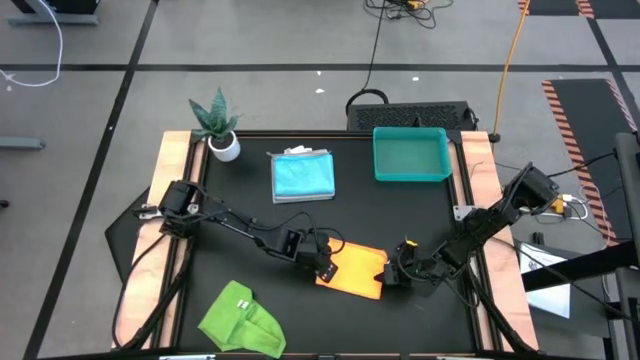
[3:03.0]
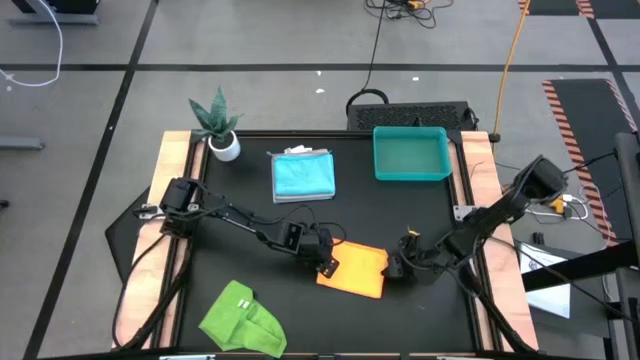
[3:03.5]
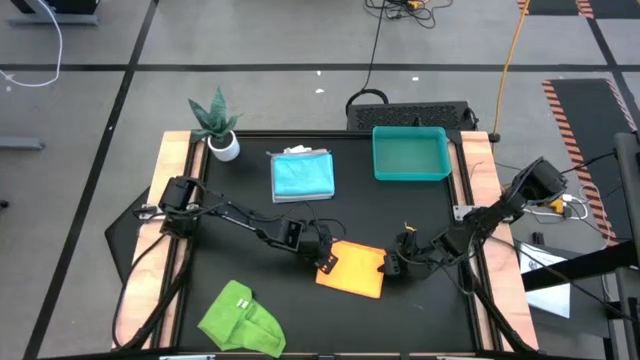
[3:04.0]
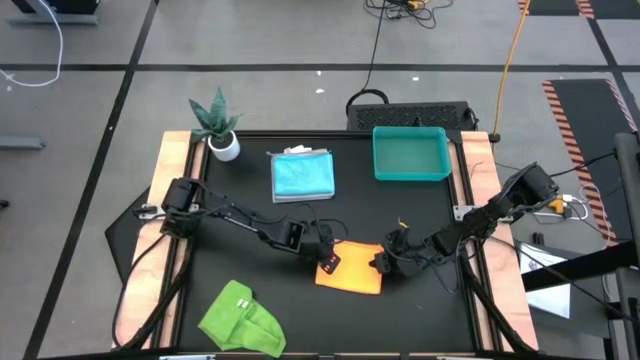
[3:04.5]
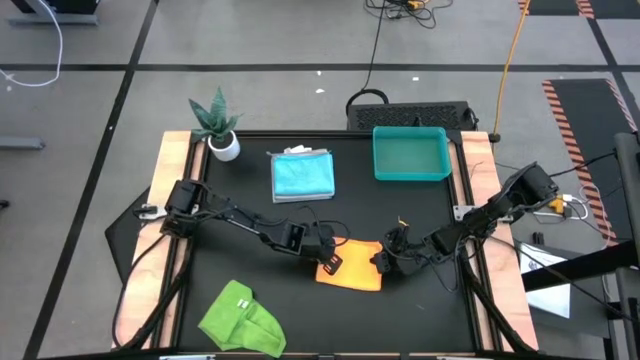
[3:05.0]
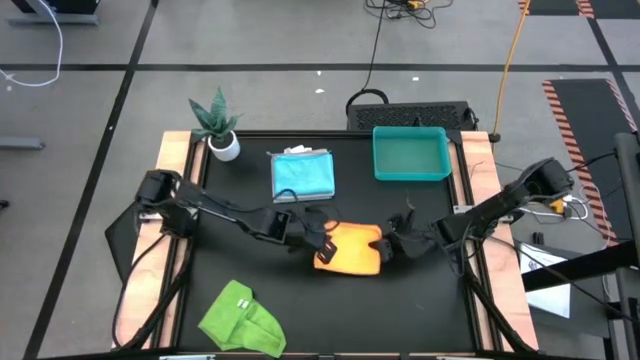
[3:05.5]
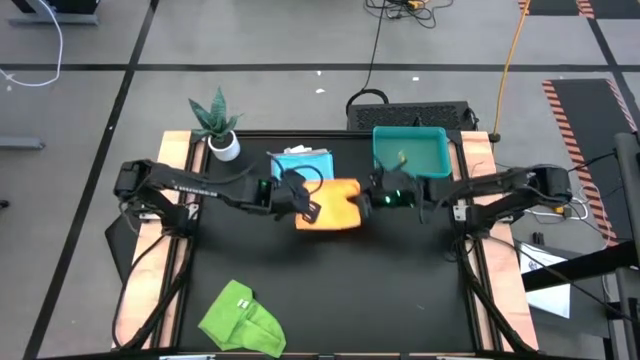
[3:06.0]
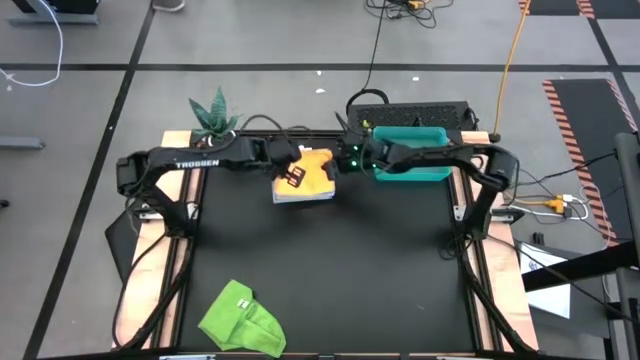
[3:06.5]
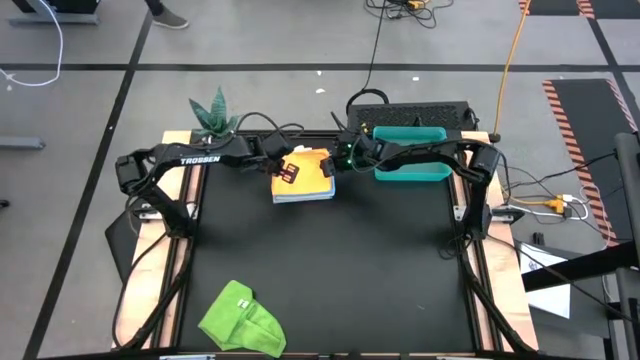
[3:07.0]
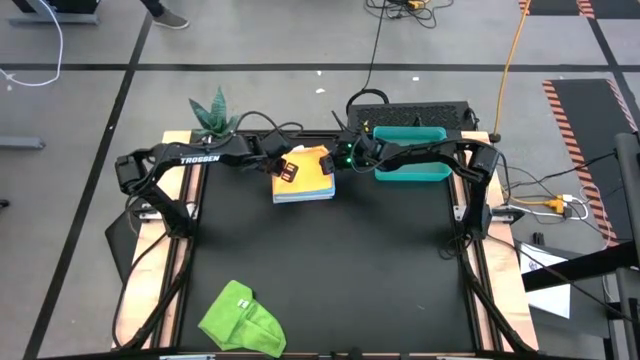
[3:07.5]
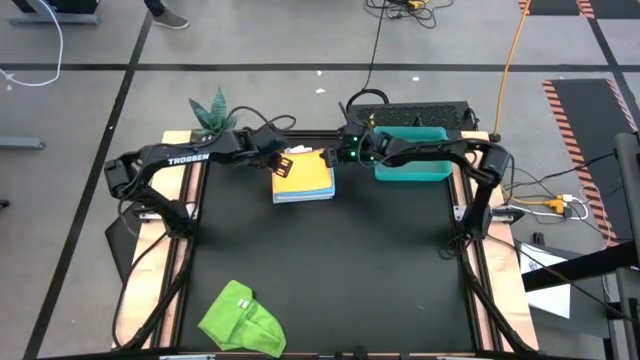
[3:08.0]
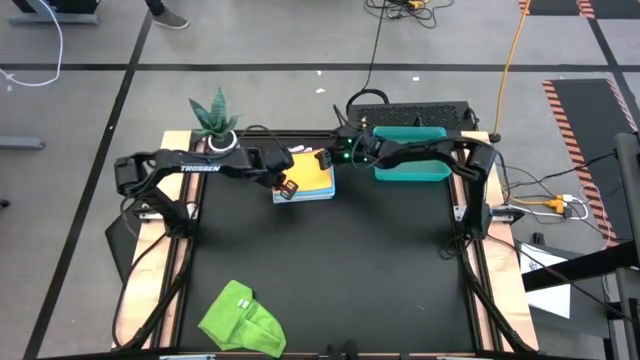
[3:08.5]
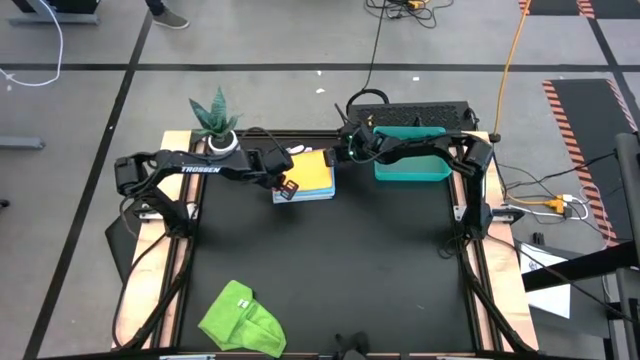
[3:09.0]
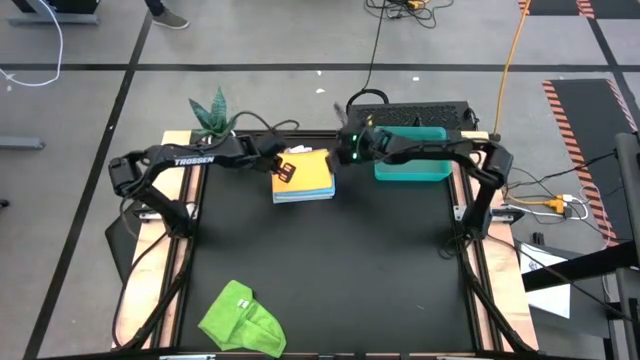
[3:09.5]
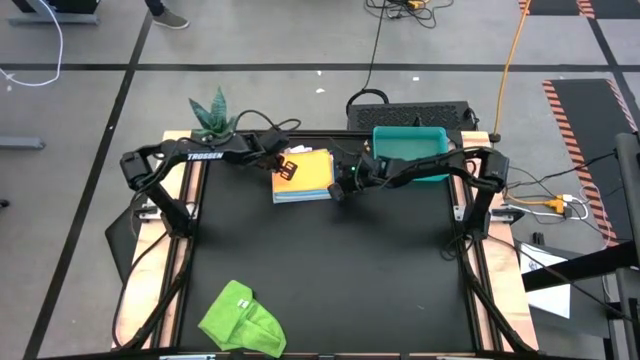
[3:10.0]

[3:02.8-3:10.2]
Task: Fold microfiber towels
Stack the yellow microfiber towel on the blue microfiber towel

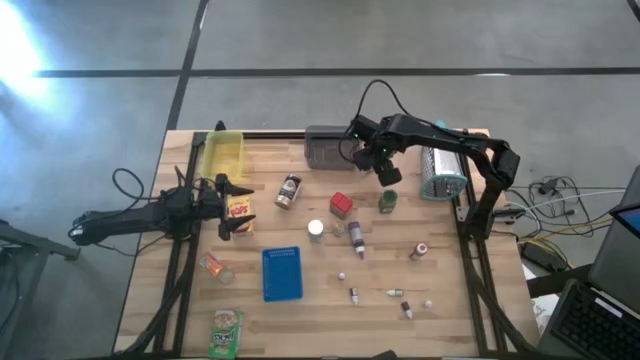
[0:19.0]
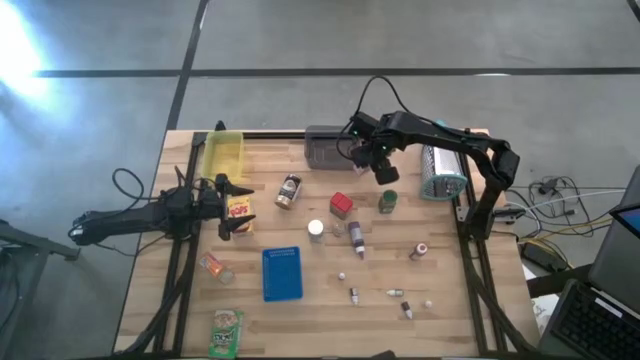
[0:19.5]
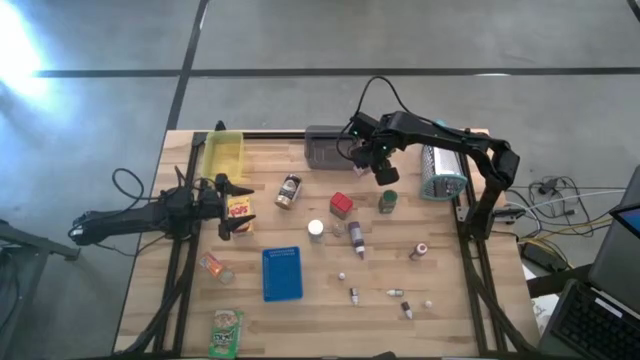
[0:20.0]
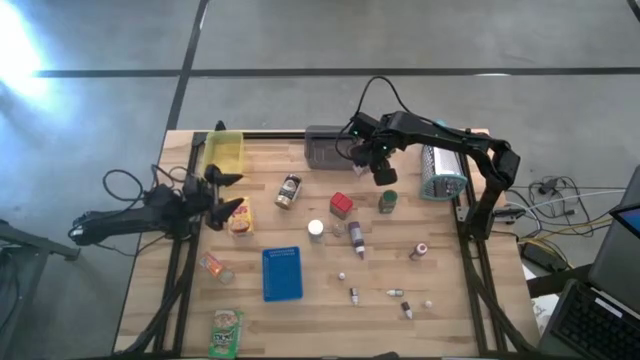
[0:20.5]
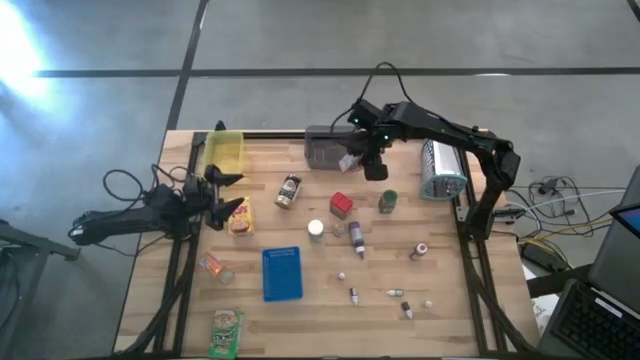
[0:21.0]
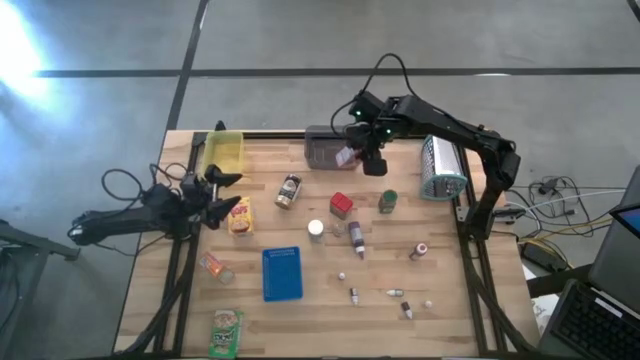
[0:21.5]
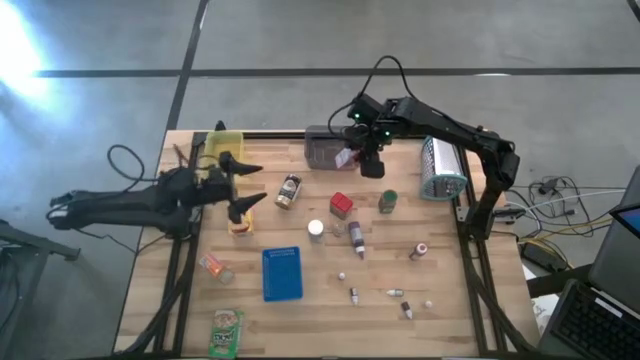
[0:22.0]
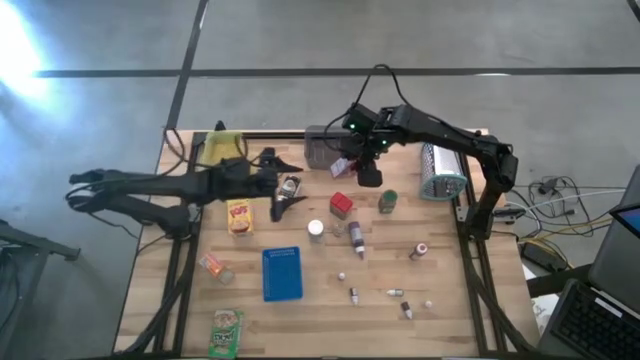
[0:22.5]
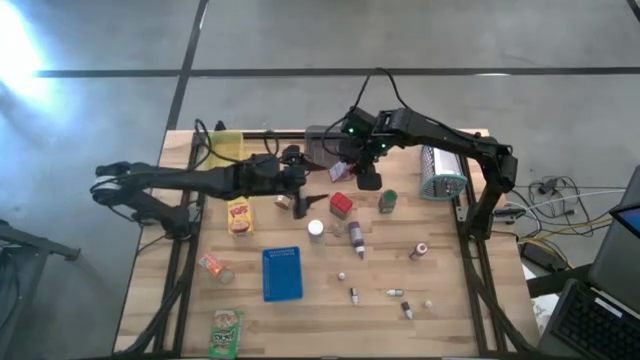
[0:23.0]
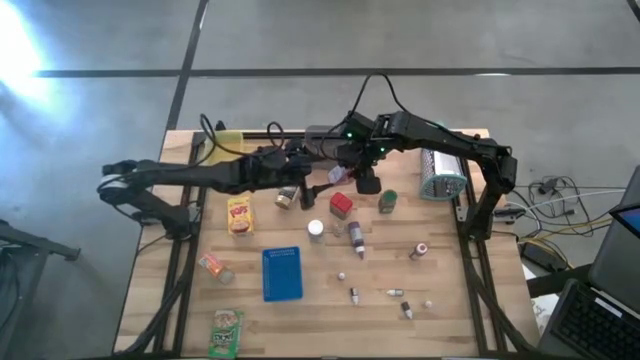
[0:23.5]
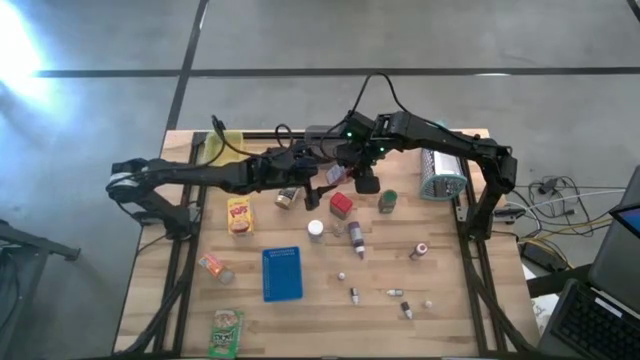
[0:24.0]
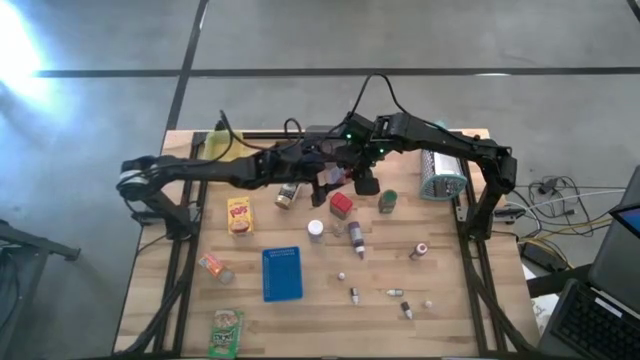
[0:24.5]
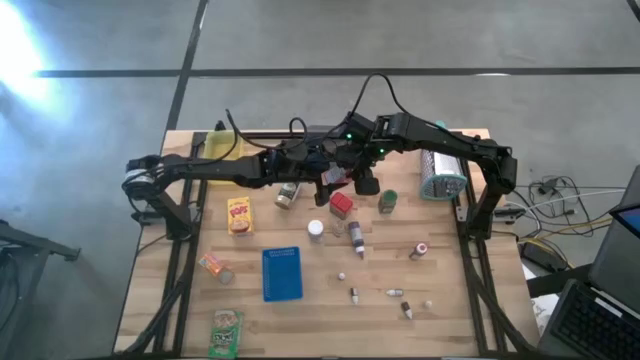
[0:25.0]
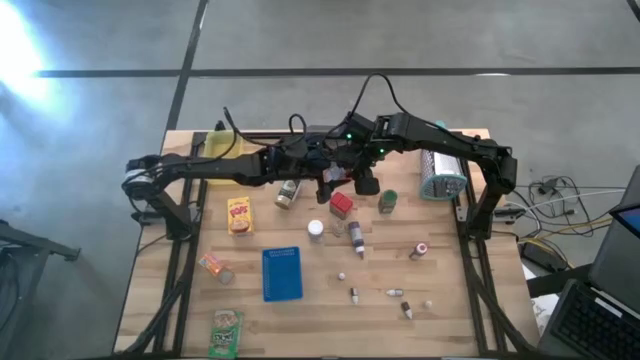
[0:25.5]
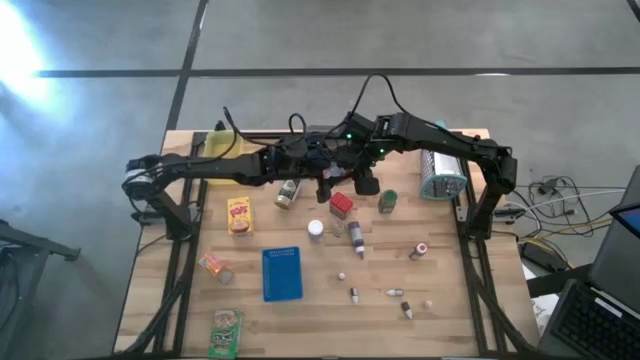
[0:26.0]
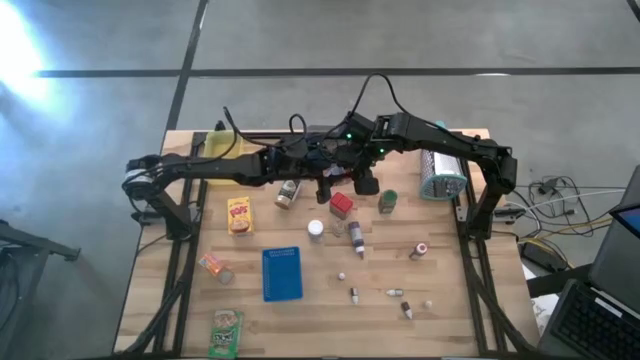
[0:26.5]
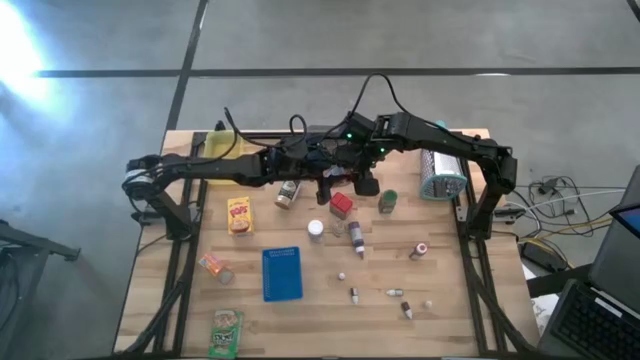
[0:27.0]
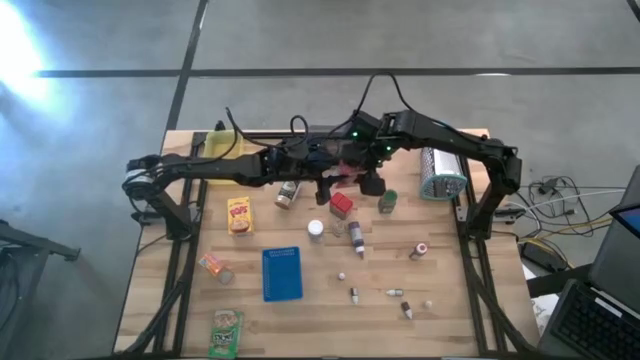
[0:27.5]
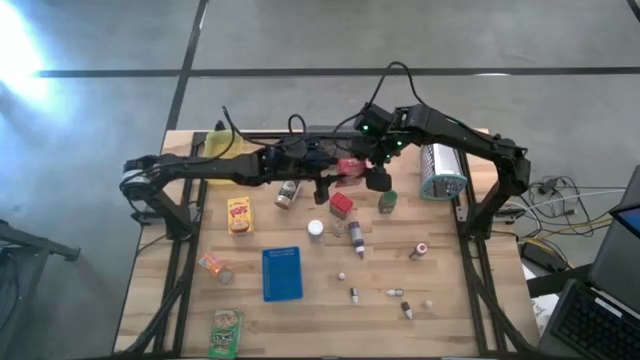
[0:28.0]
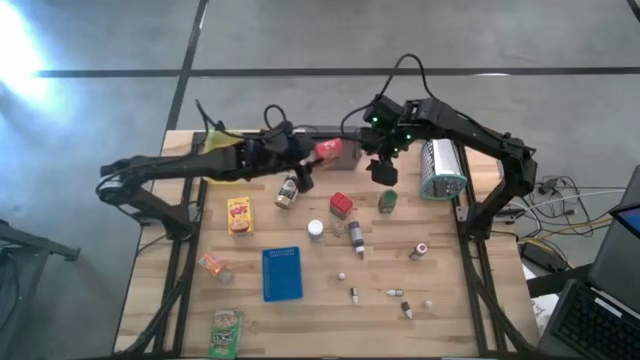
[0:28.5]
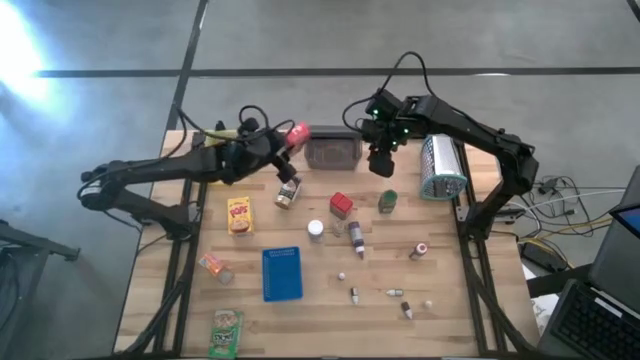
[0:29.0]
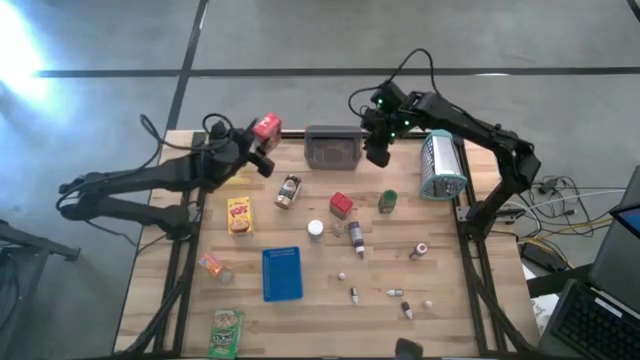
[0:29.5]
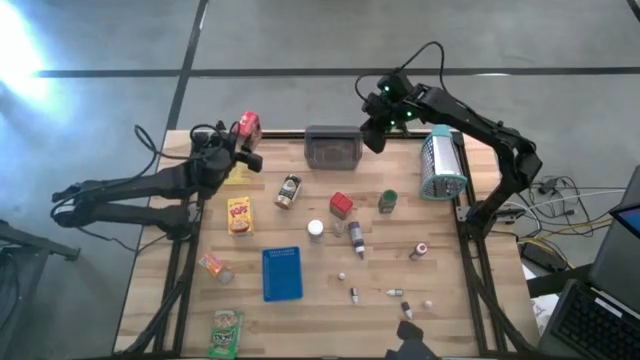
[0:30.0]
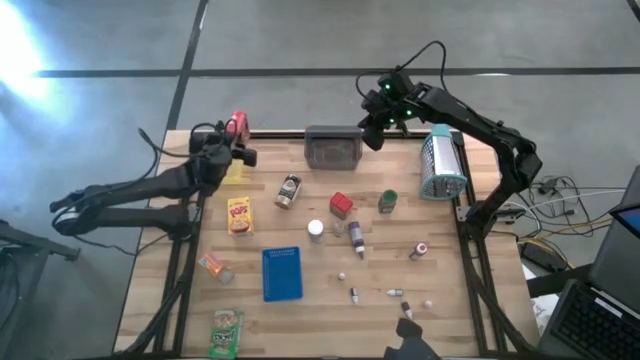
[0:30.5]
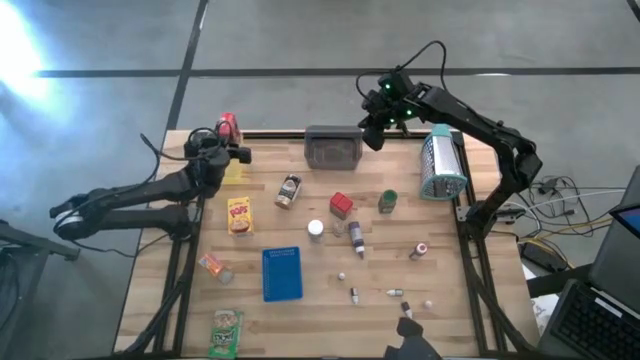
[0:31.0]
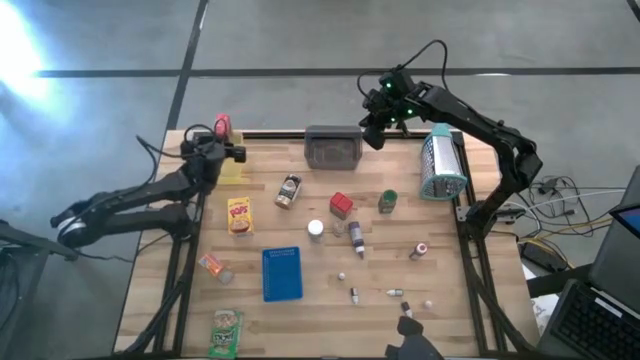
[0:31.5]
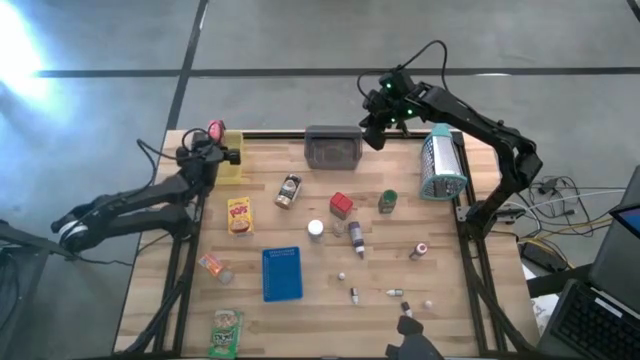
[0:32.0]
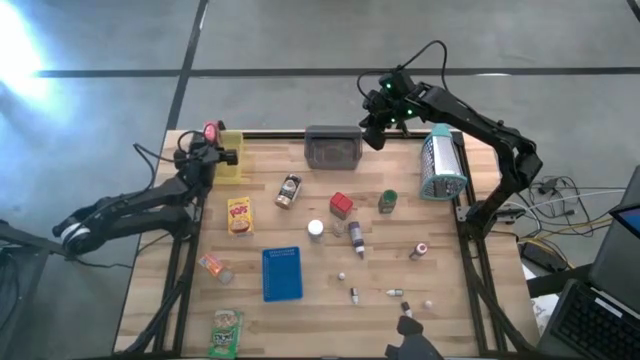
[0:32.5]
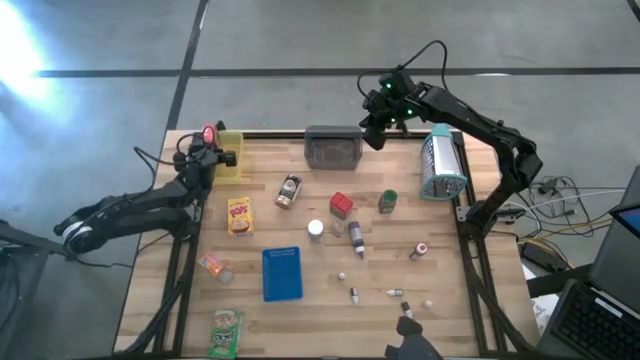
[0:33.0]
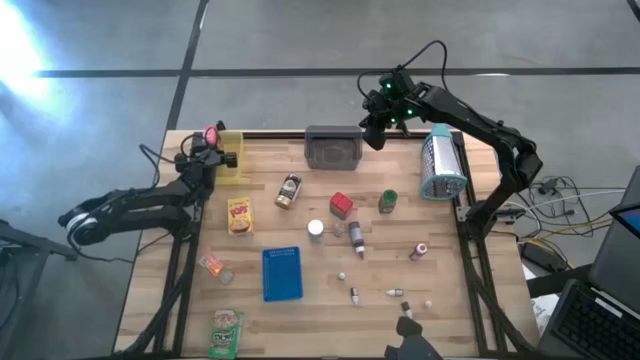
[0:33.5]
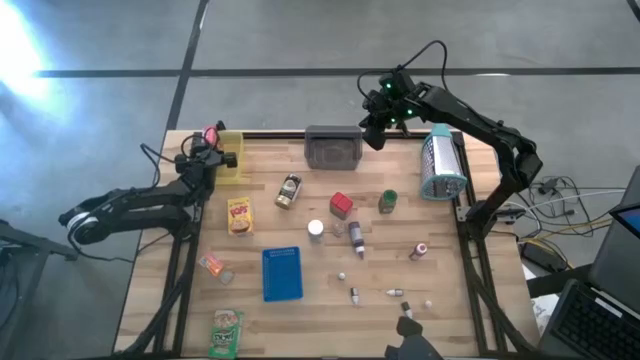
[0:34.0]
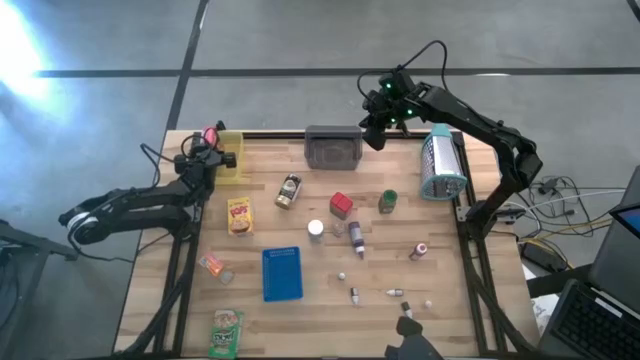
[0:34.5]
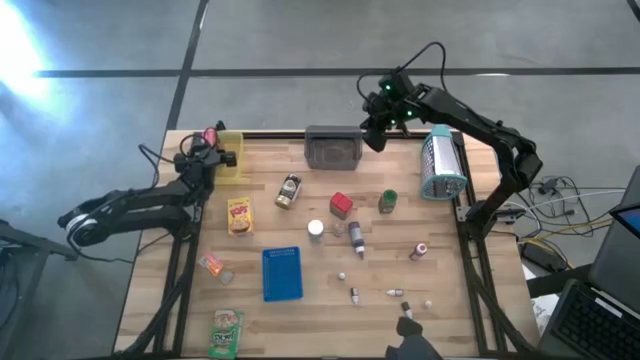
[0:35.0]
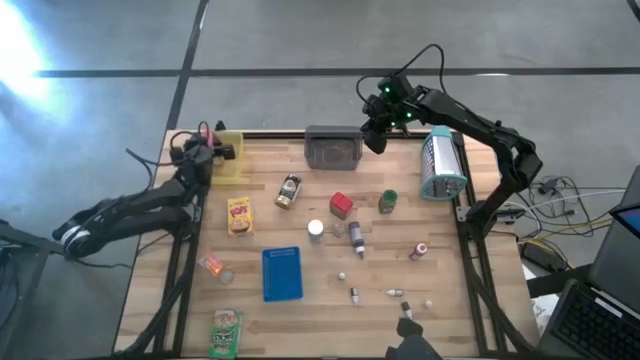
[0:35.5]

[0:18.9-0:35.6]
Task: Pick & Place Kitchen Items
Put the red cereal box into the yellow bin
